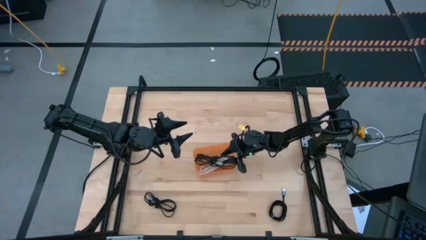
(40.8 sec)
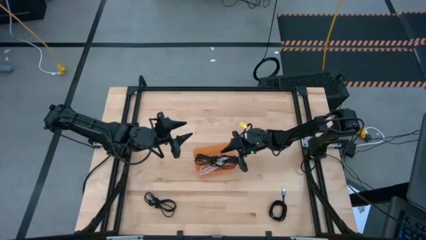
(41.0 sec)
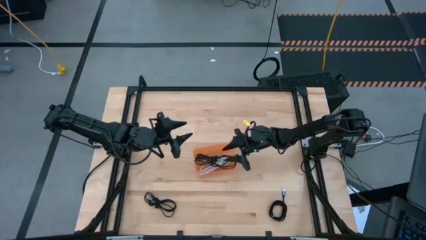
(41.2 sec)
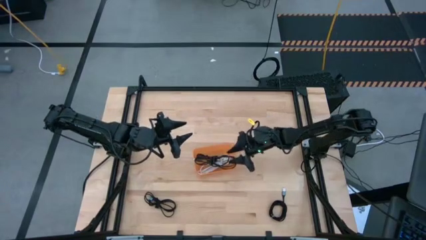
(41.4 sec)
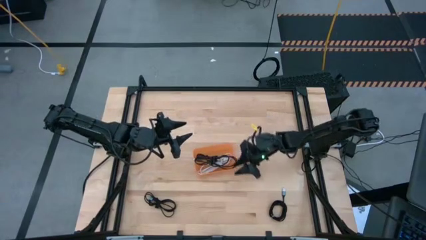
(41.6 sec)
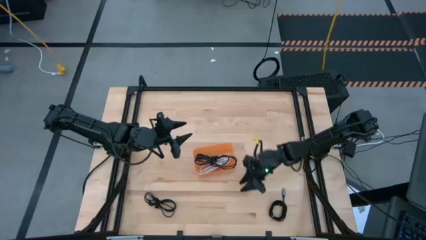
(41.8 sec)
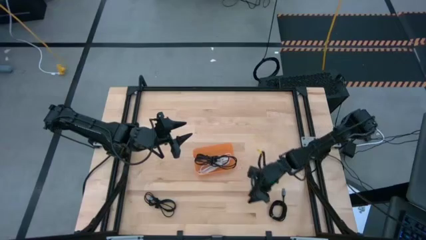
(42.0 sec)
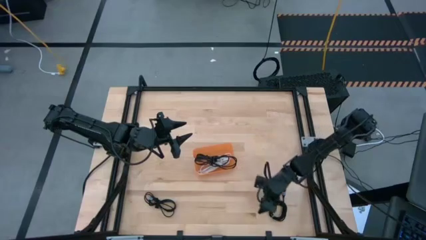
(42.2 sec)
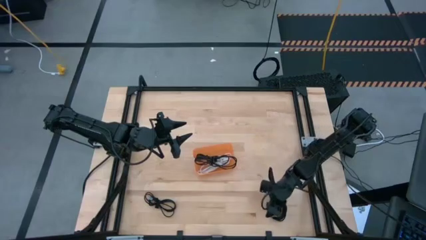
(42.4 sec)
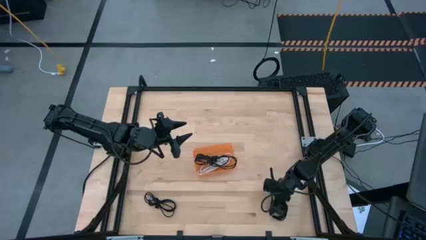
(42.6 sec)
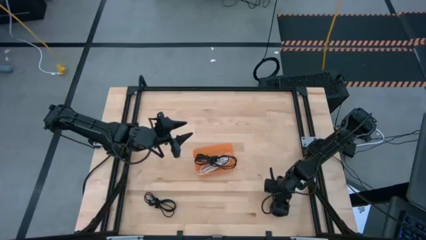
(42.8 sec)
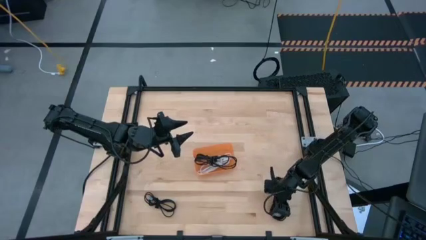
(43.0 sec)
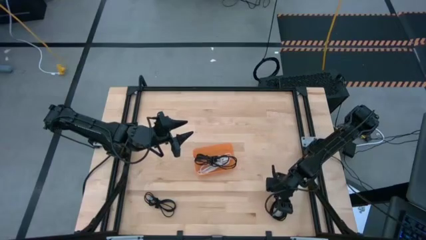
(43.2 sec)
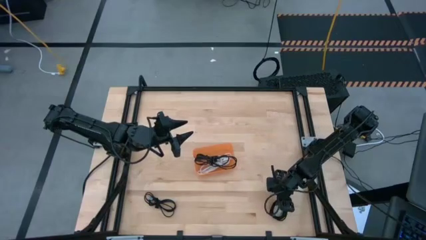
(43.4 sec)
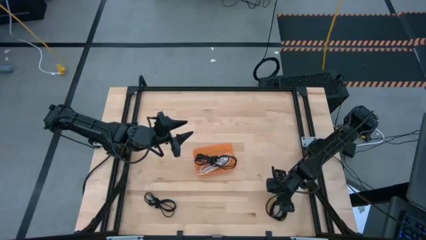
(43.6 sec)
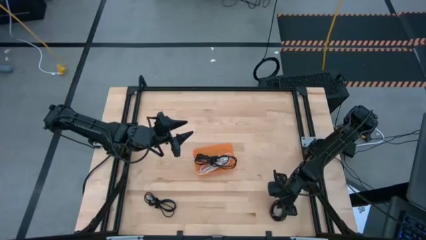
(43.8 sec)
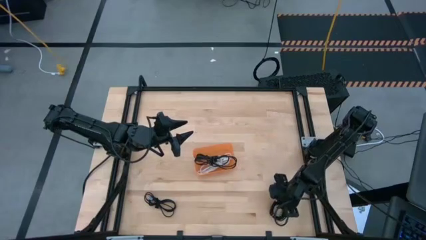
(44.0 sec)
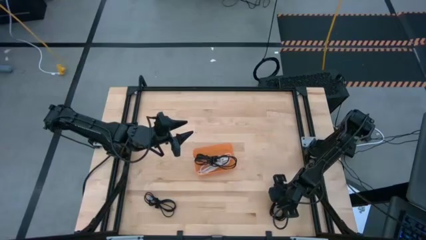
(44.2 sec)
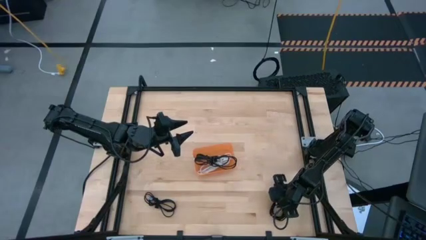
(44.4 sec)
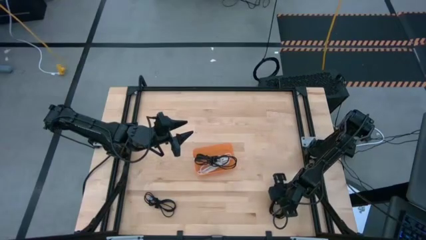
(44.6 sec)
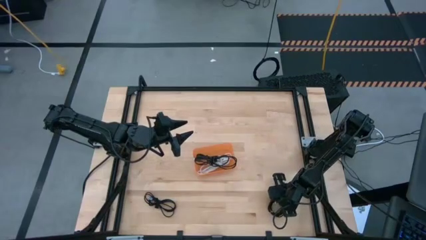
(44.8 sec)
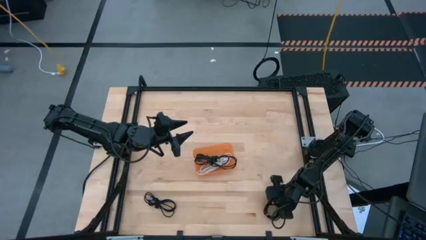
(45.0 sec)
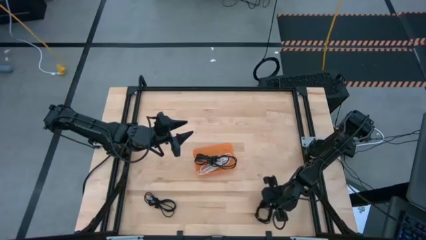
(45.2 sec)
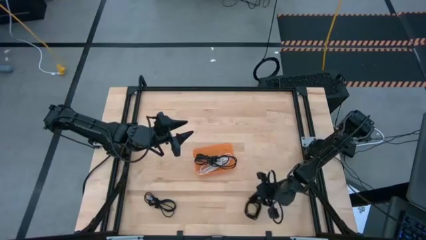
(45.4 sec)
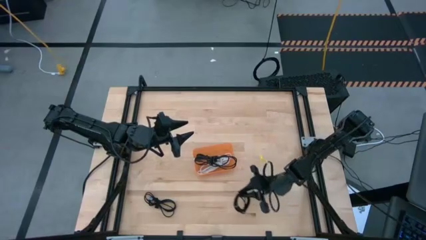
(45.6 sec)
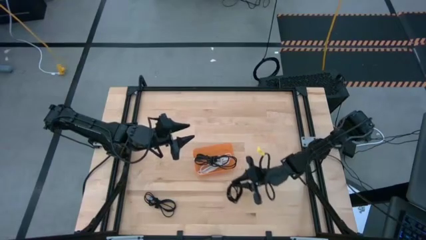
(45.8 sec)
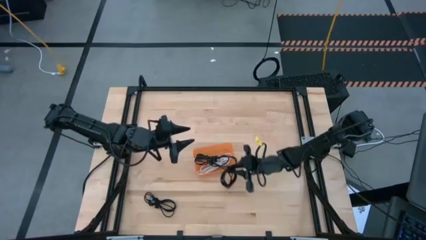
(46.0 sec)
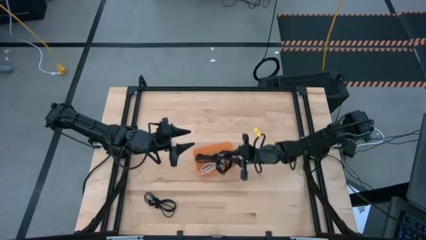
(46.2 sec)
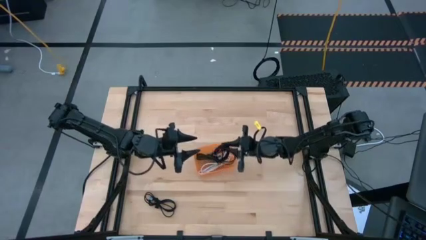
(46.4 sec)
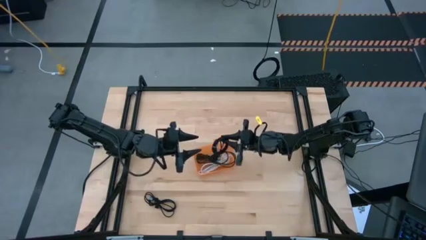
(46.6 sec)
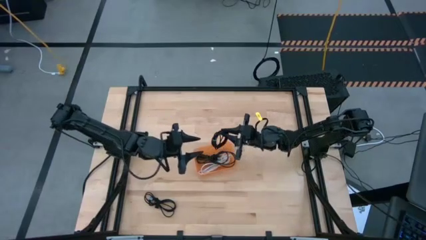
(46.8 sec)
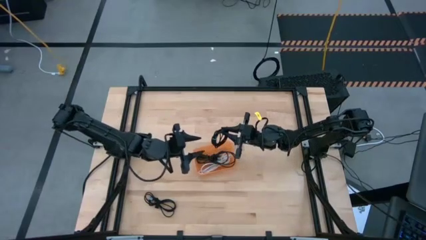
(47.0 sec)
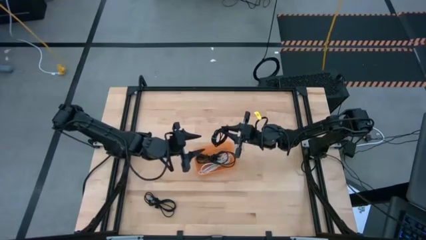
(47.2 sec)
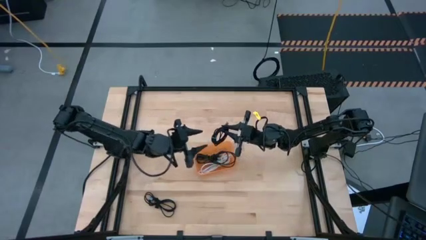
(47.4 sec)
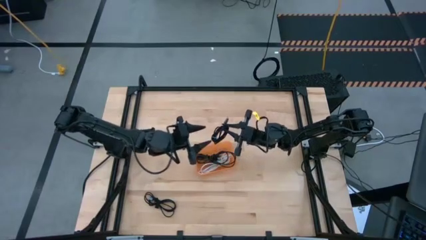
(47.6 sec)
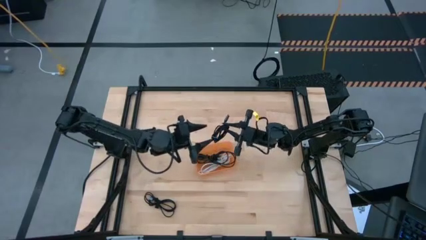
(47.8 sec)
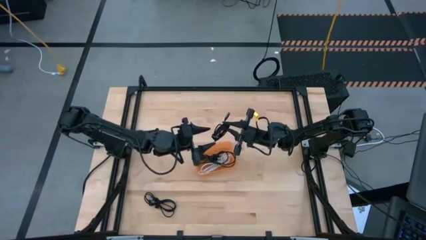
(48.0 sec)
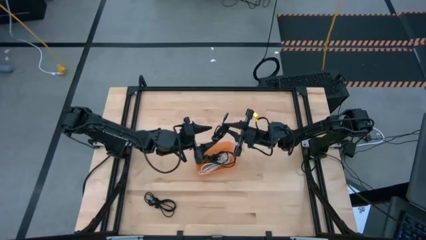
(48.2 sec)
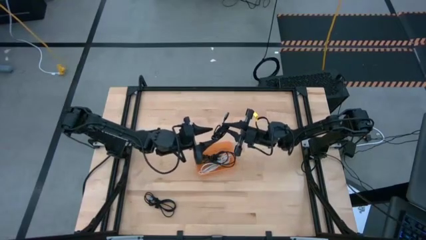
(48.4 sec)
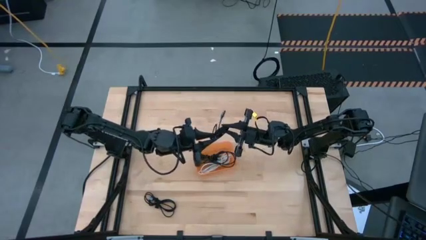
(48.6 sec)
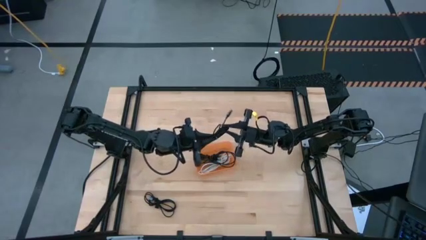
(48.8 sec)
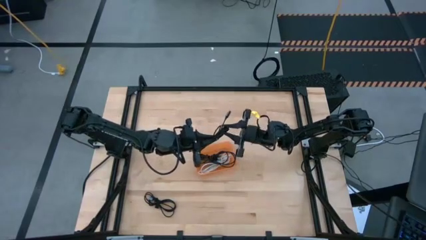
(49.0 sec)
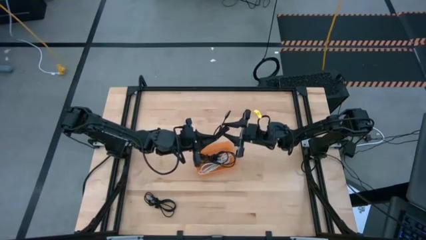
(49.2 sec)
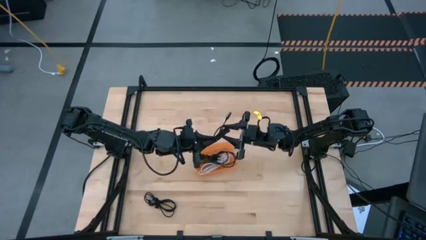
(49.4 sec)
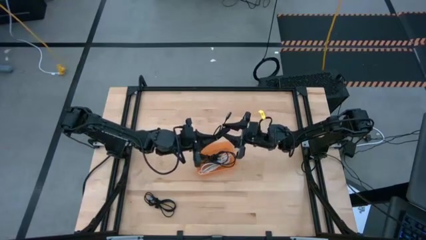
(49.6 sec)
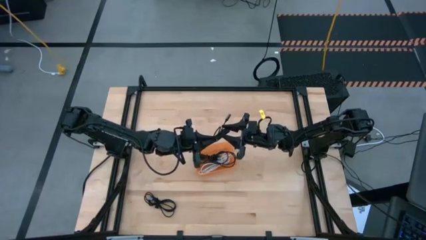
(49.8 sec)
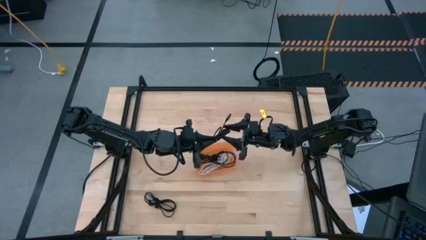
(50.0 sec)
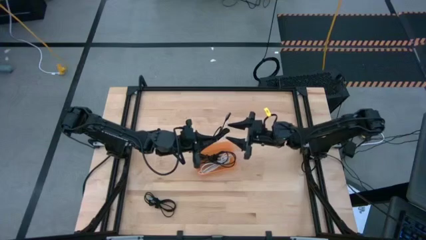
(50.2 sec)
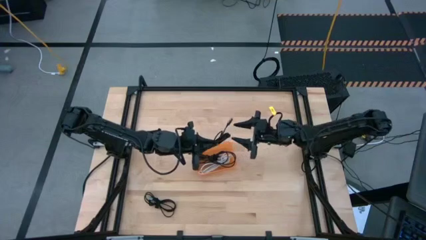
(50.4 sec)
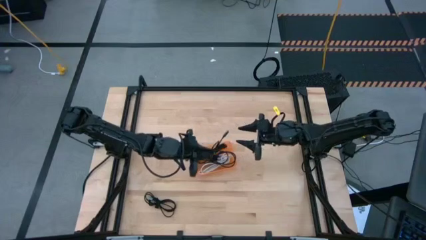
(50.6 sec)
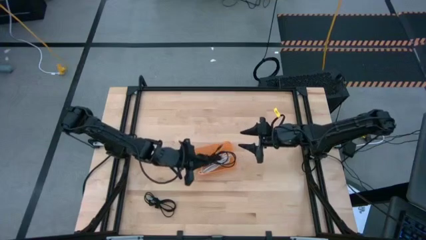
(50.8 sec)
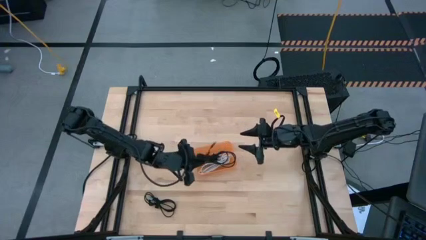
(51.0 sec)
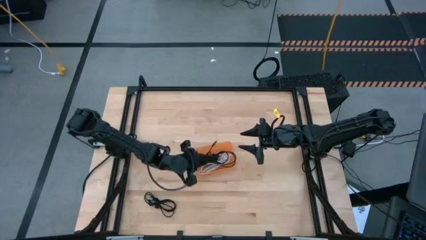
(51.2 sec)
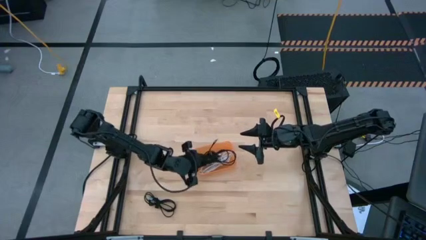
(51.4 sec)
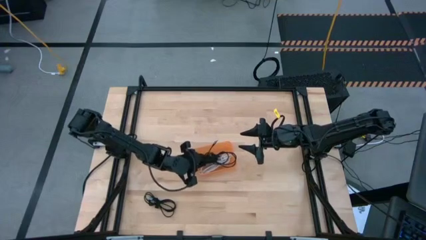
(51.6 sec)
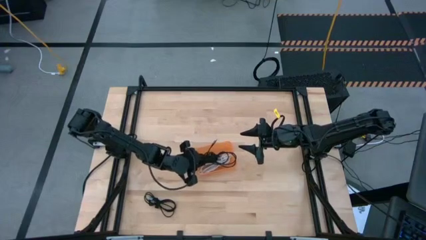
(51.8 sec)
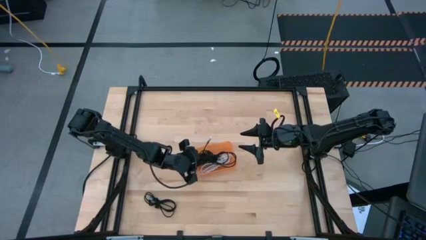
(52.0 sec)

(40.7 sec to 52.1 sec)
Task: Pick and place USB-C Cables
Put the black charger cable into the orange bin
